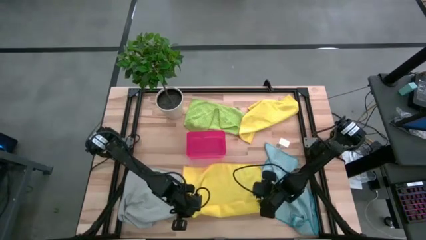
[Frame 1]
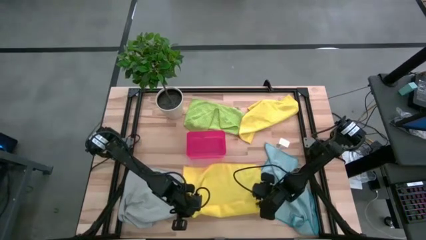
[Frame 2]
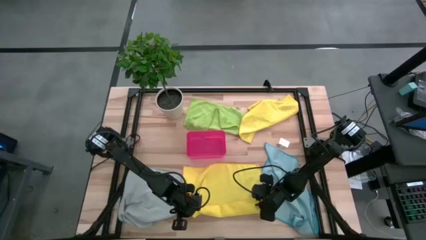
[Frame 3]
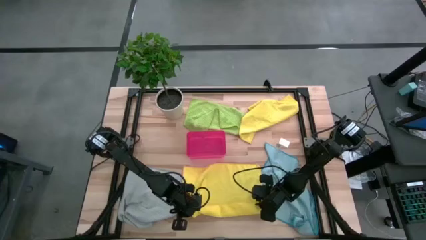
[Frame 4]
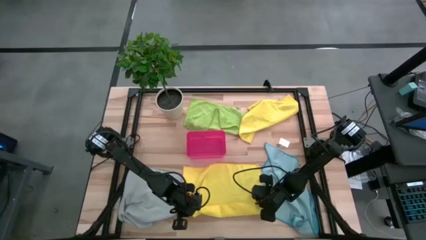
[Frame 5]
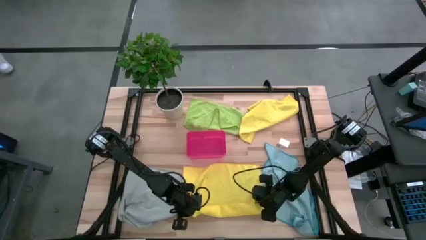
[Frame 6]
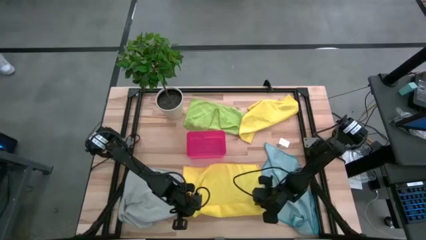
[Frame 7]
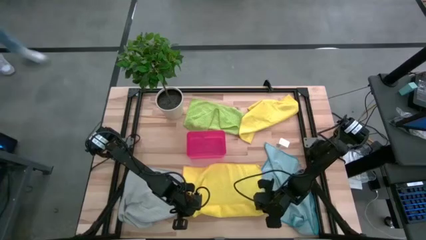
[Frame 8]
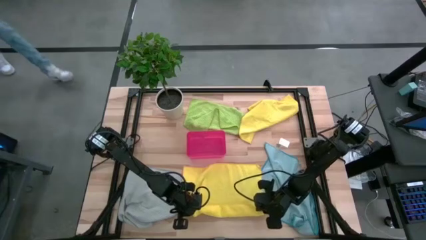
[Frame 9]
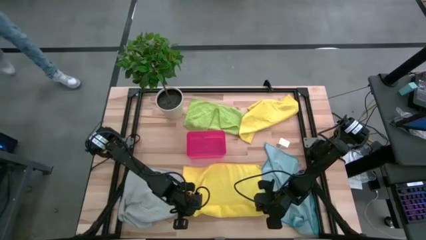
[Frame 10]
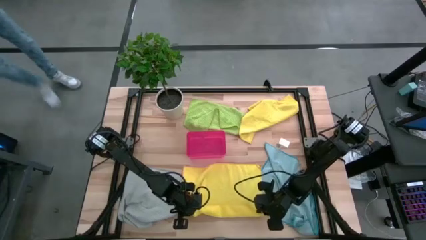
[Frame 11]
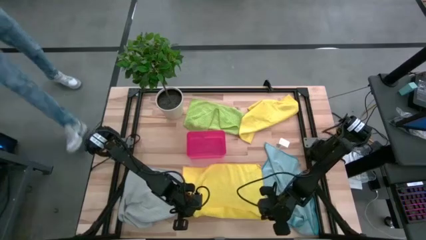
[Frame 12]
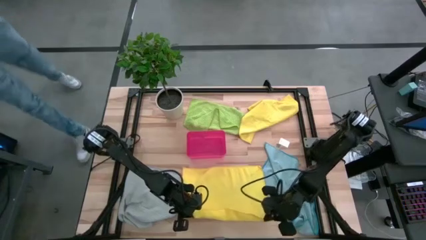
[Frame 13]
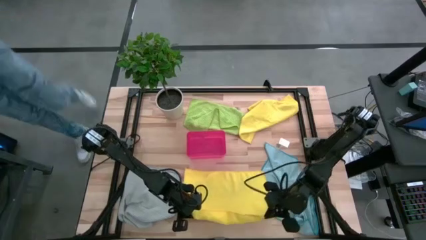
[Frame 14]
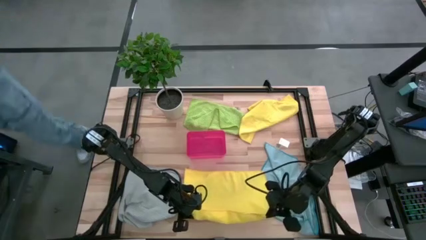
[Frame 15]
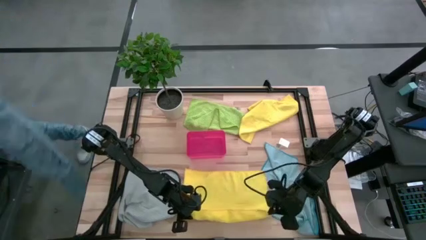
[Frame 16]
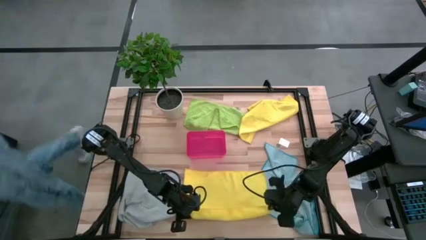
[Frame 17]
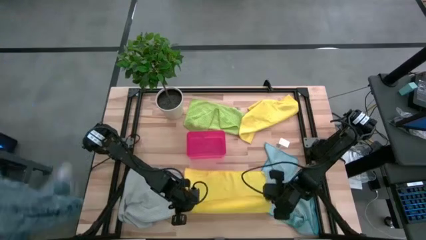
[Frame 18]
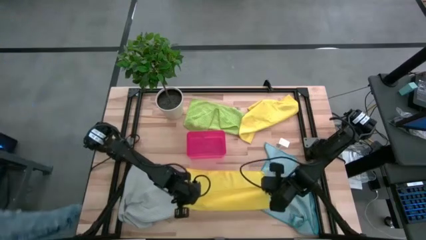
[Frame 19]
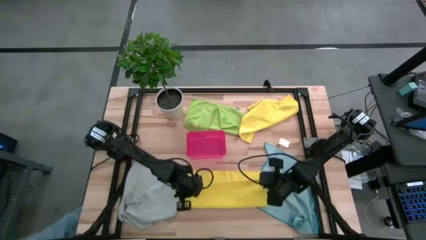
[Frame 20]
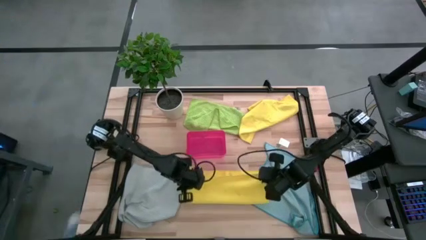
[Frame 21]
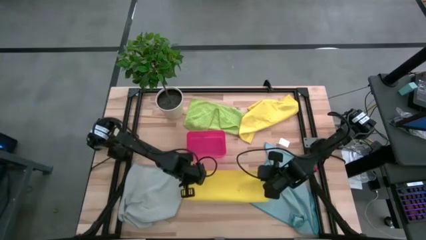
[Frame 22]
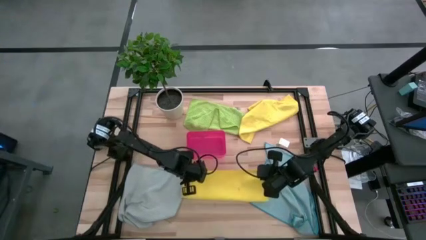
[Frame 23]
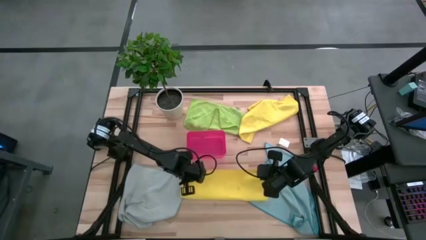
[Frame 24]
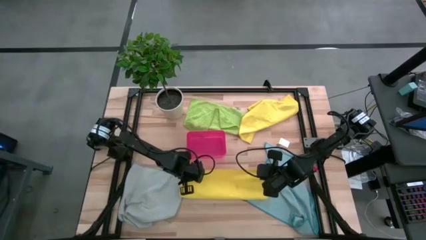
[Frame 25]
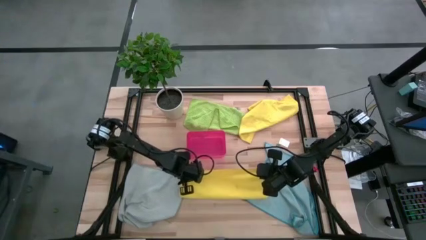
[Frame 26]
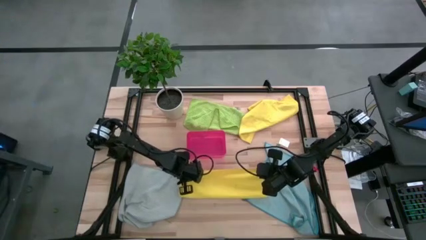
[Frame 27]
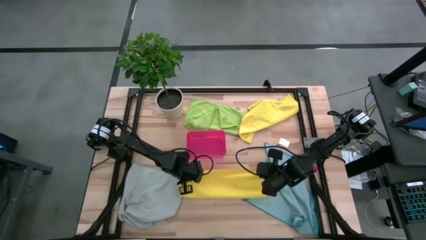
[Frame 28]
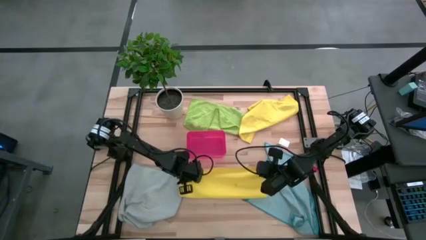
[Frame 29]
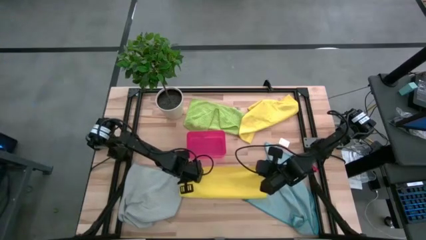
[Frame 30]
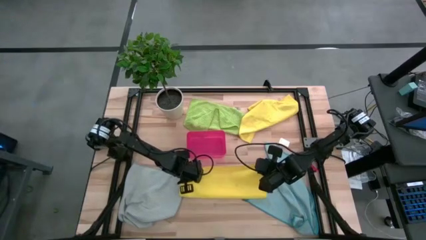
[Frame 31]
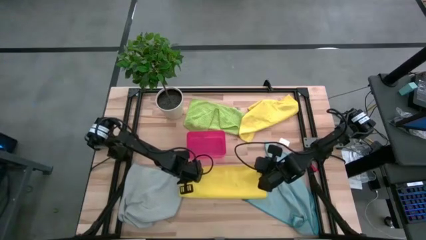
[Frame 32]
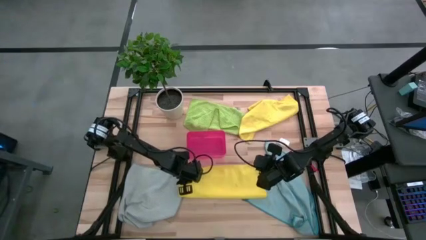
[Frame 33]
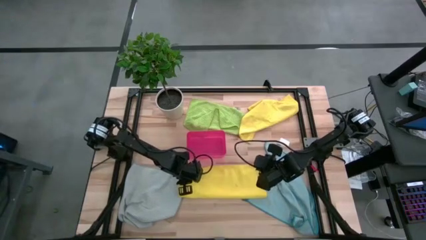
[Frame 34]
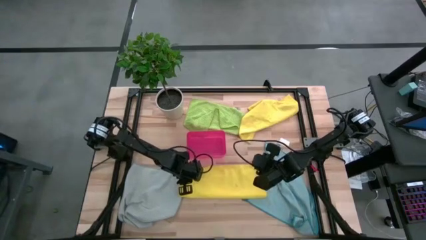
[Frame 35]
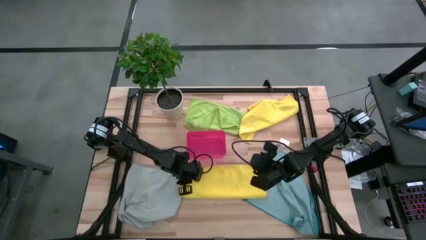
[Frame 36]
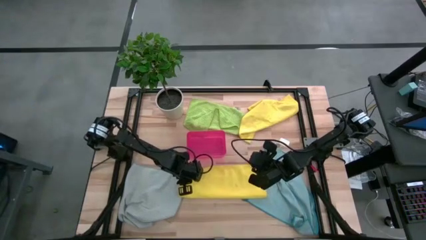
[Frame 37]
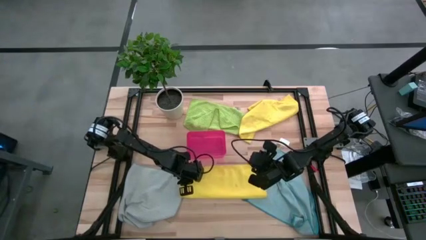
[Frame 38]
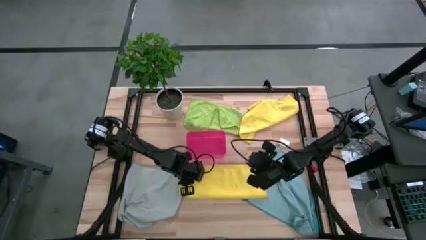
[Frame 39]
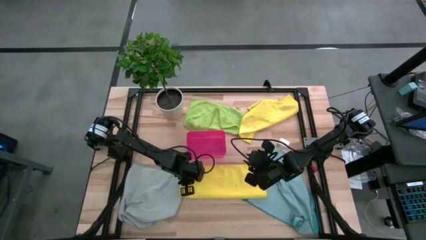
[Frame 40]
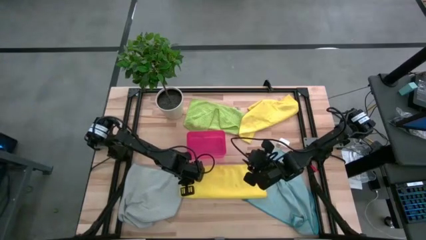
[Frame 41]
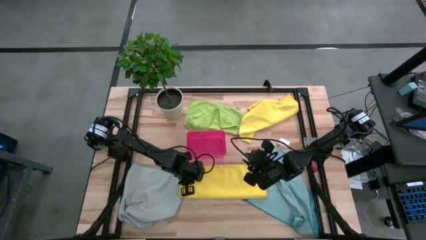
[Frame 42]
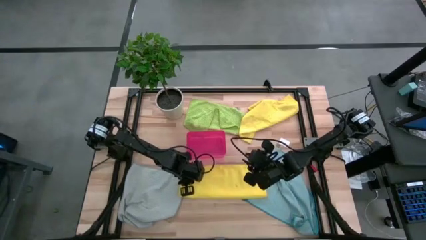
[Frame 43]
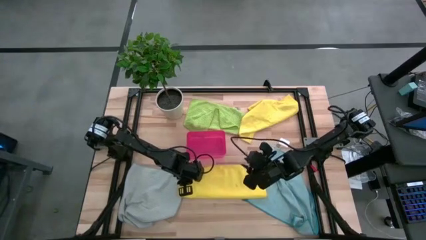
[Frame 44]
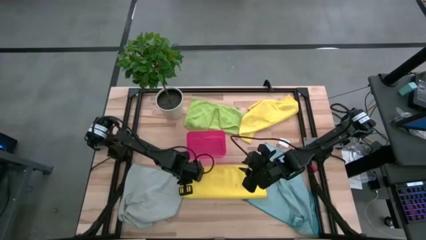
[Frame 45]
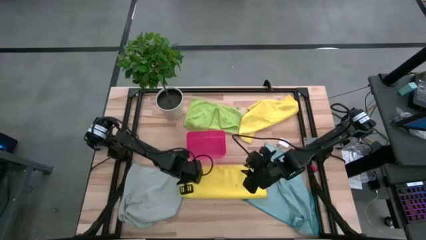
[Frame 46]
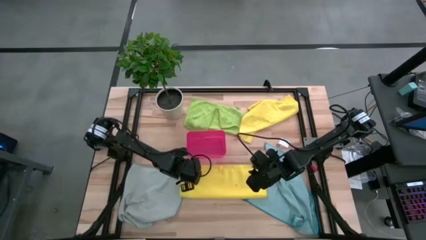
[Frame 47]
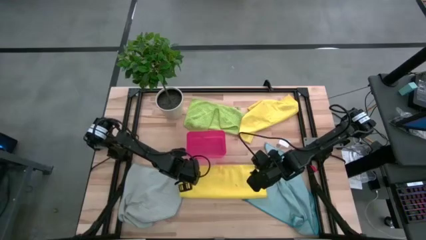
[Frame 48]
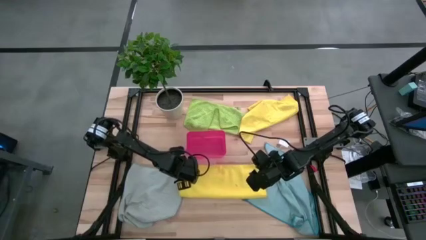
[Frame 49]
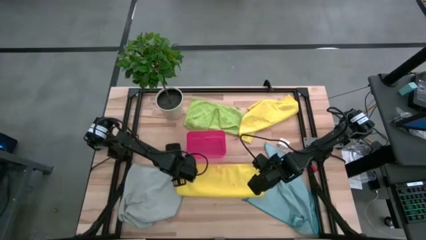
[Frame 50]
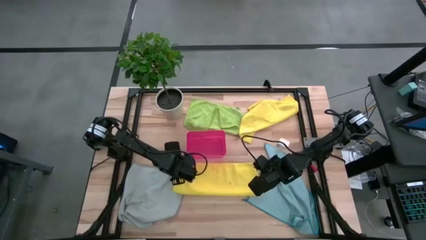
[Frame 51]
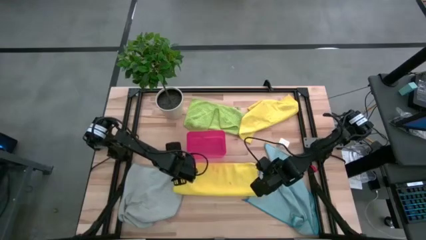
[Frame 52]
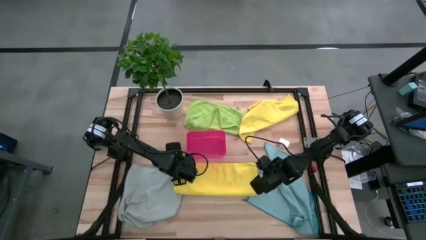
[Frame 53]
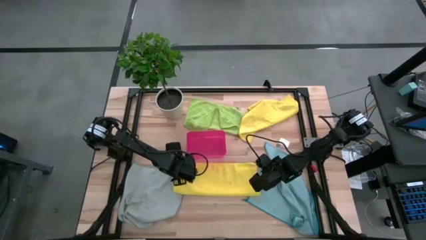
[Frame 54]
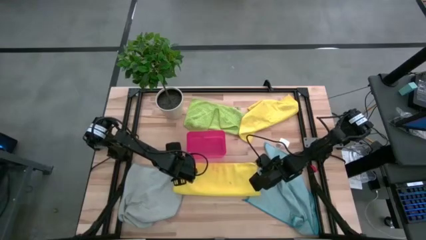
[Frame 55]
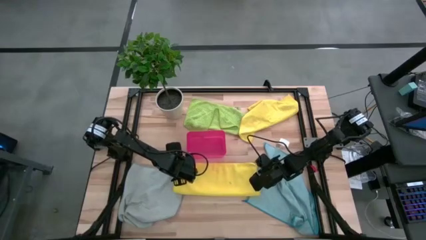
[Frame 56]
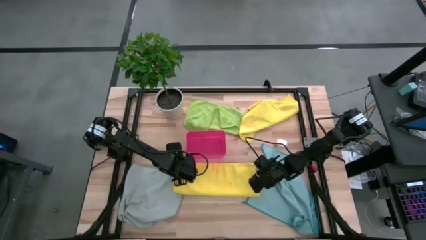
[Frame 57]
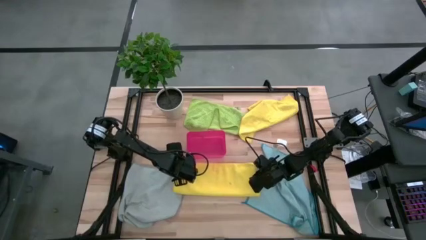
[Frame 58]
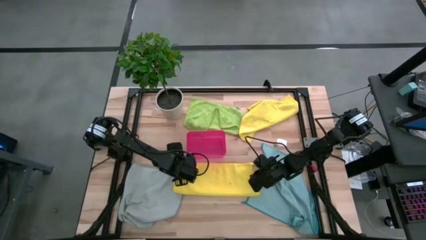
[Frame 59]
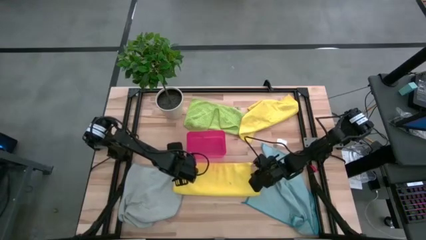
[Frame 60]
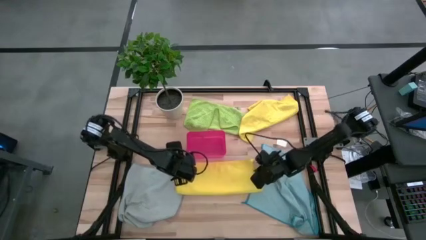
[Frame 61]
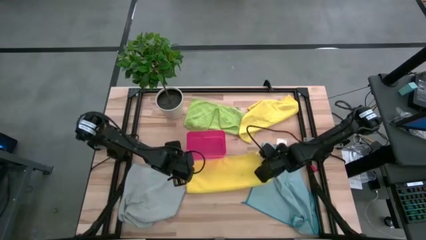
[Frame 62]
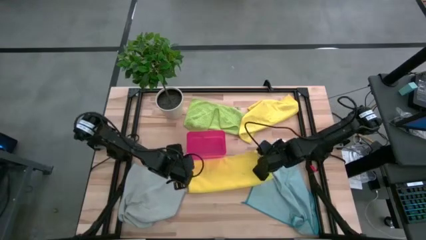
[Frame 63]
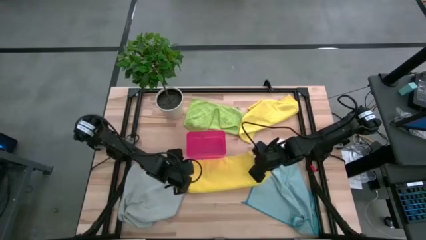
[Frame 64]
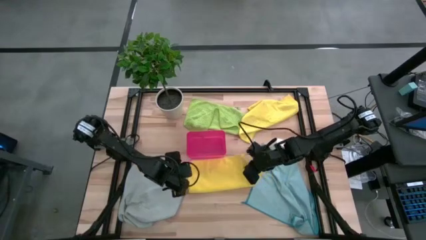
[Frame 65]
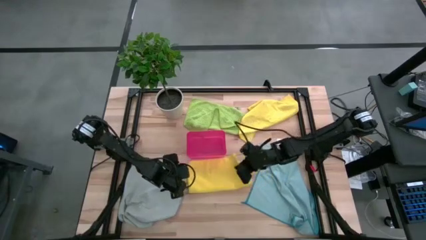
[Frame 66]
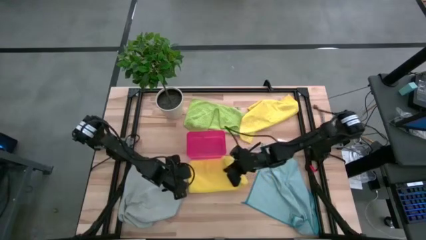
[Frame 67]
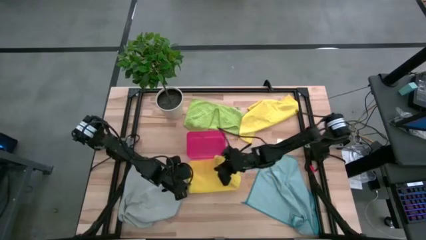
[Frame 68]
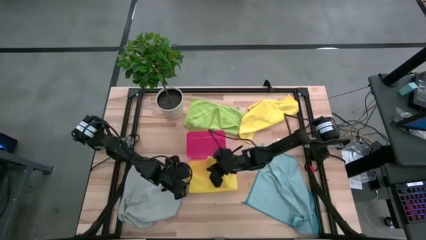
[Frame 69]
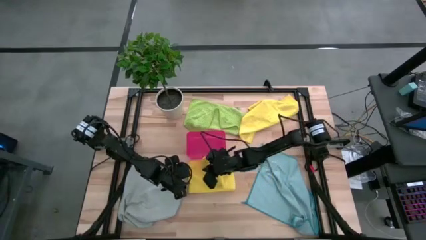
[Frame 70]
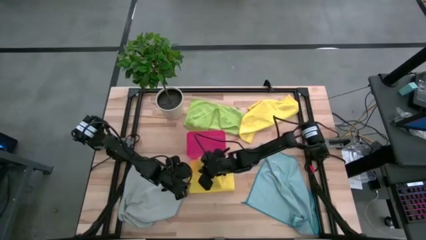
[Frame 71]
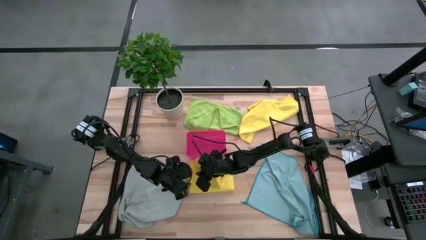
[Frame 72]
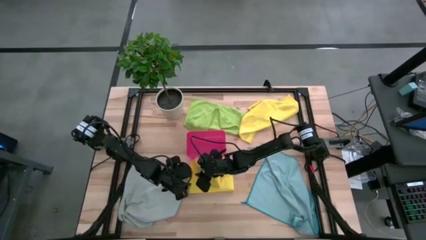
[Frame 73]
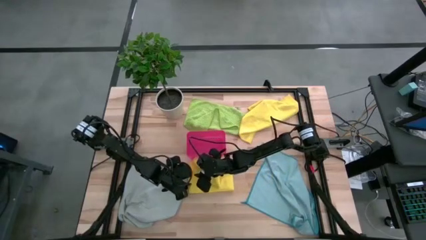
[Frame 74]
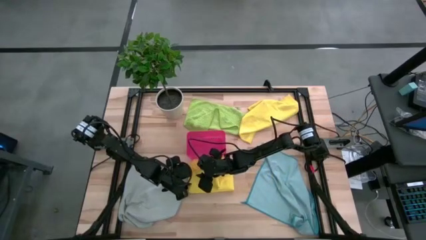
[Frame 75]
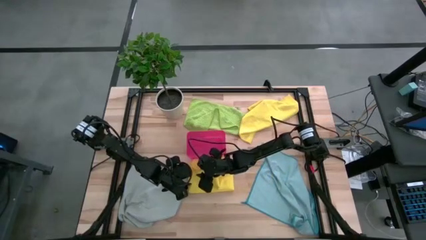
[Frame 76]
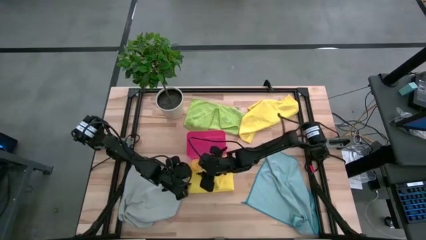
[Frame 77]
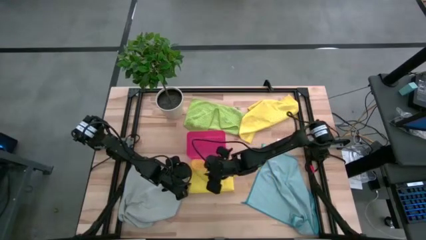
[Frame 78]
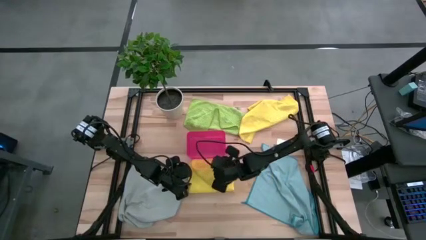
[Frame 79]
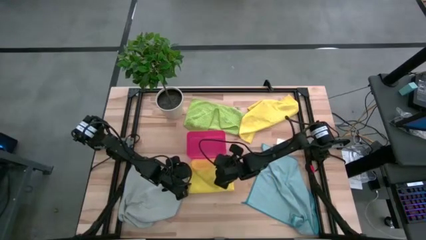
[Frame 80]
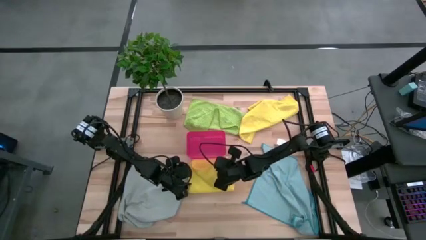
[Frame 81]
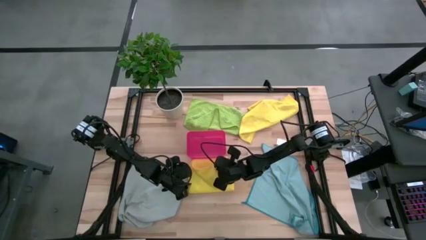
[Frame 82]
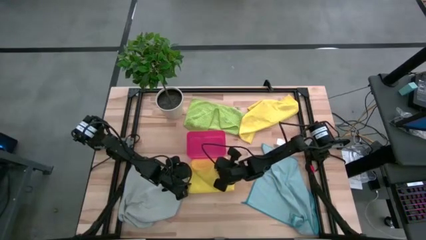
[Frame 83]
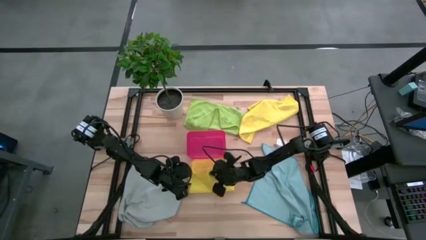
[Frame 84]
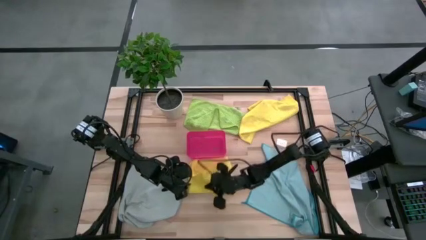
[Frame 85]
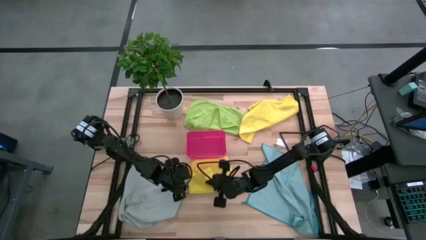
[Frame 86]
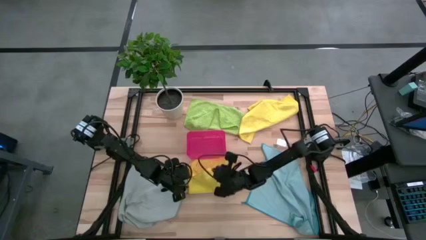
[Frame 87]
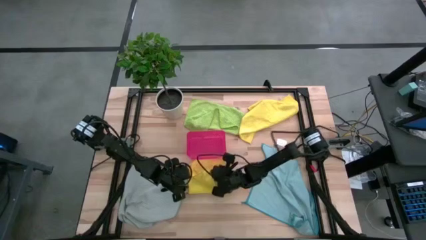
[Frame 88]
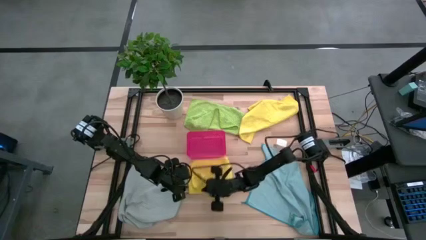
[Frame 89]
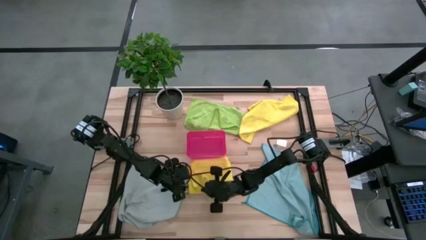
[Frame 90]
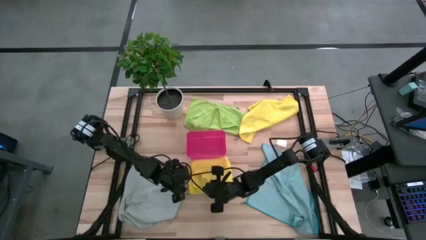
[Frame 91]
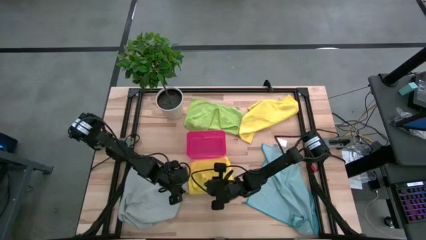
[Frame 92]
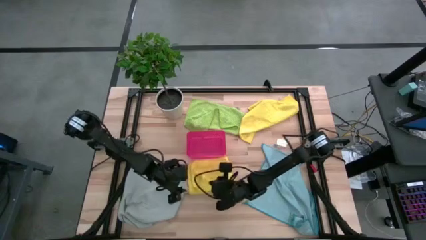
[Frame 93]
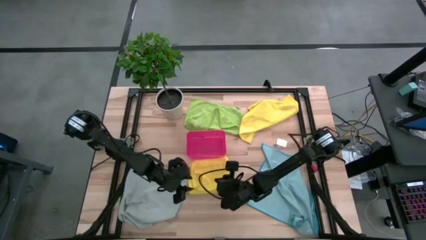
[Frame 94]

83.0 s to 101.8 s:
Task: Fold microfiber towels
Fold the bottom yellow microfiber cloth
